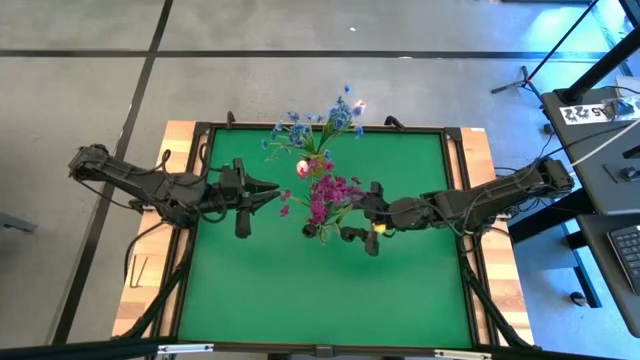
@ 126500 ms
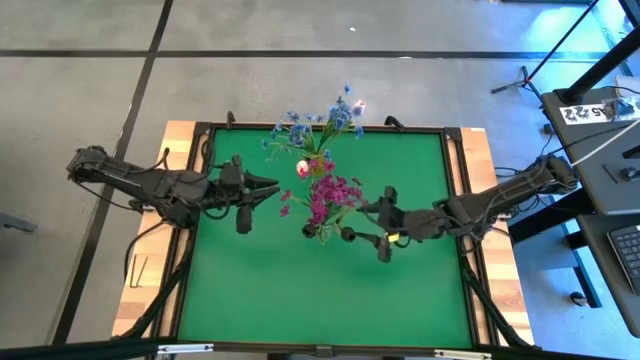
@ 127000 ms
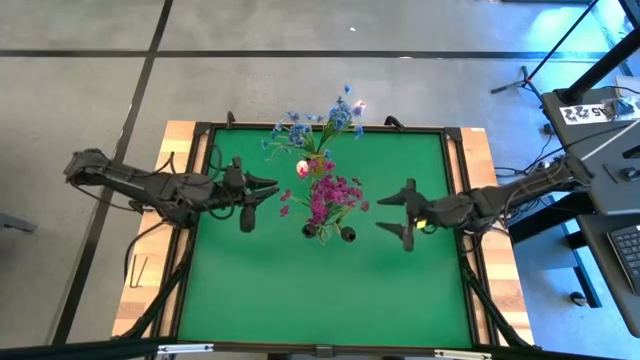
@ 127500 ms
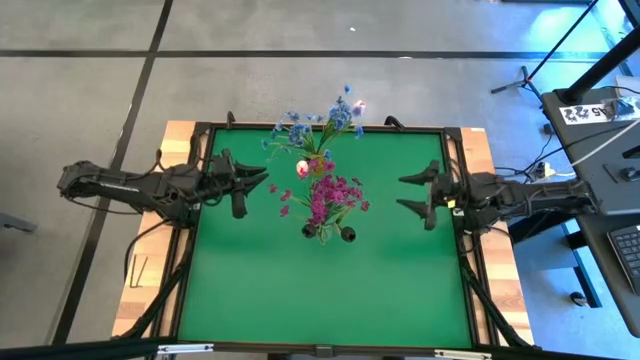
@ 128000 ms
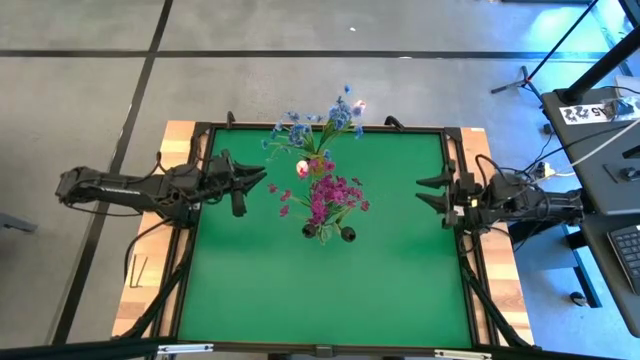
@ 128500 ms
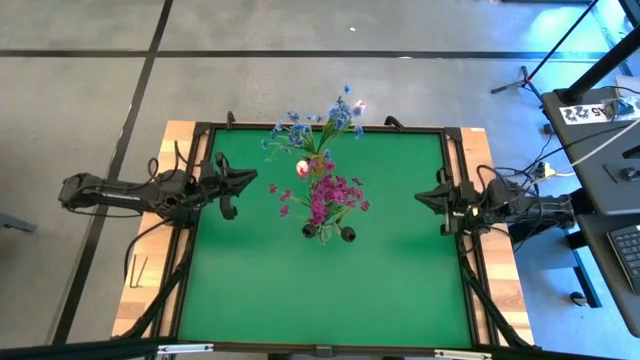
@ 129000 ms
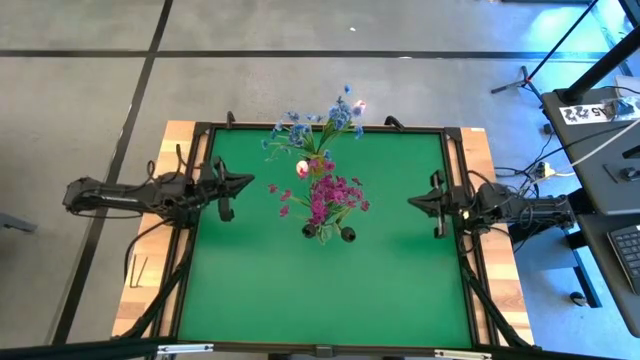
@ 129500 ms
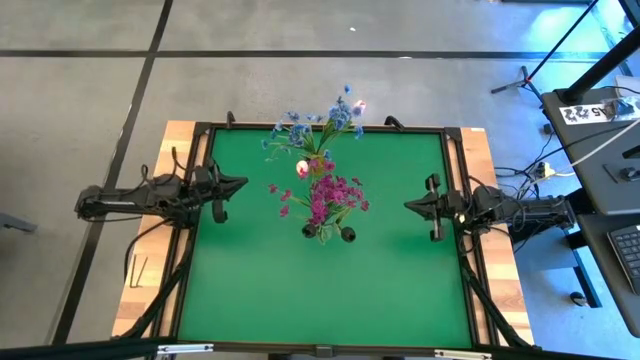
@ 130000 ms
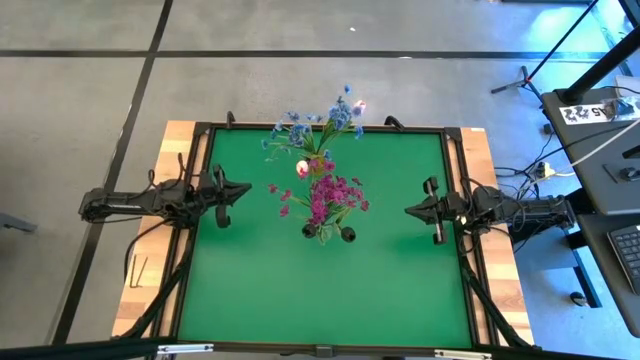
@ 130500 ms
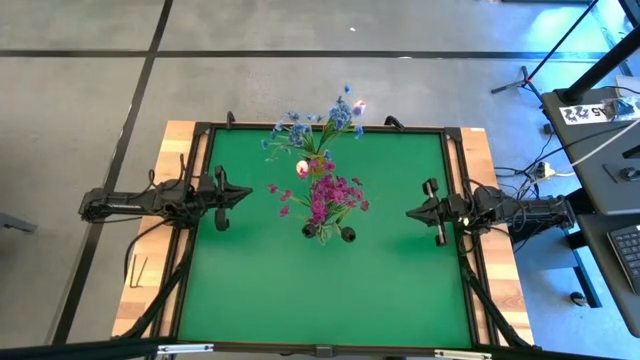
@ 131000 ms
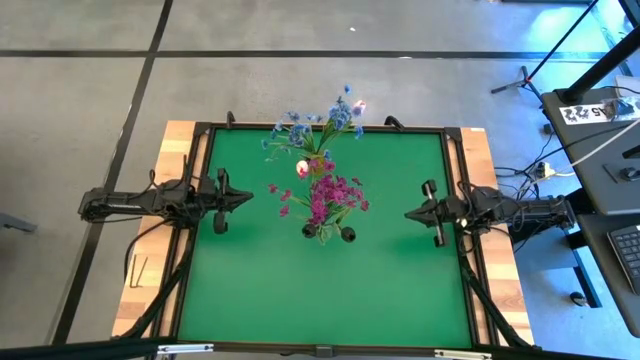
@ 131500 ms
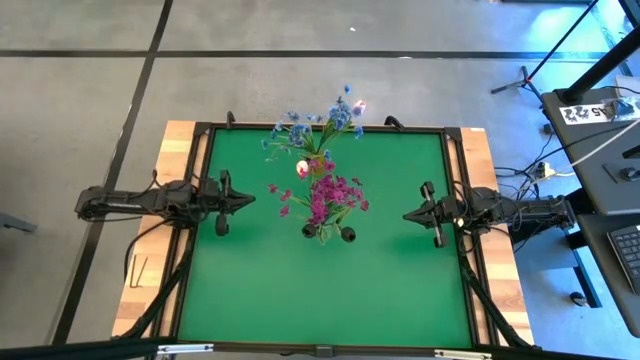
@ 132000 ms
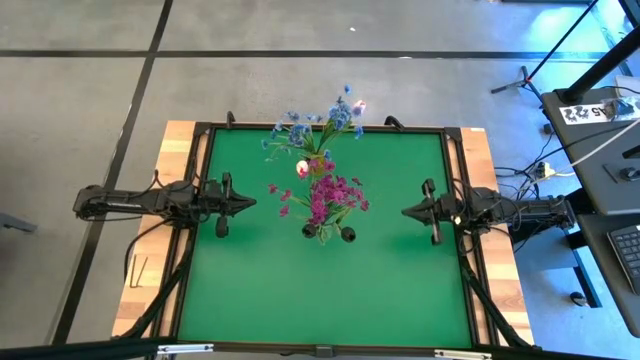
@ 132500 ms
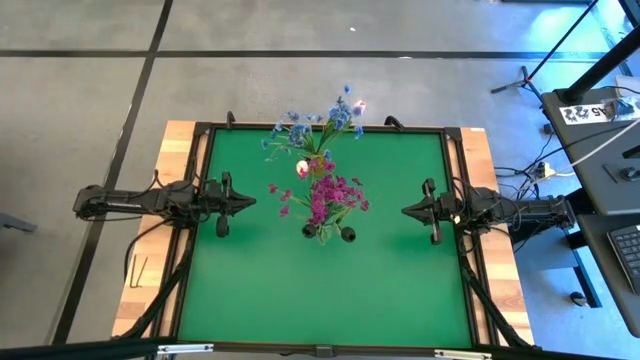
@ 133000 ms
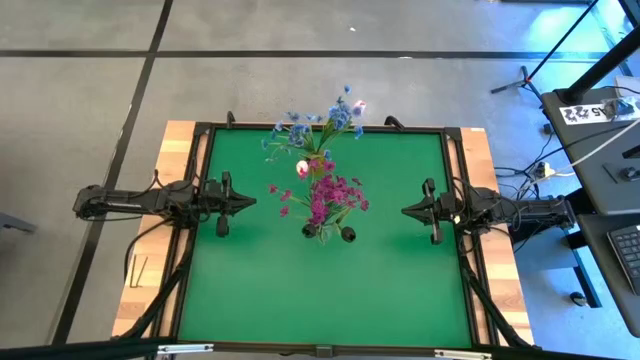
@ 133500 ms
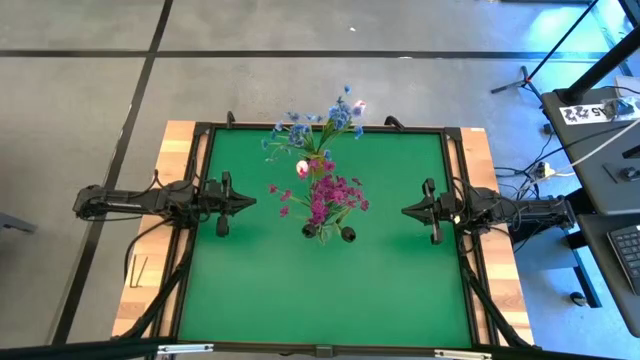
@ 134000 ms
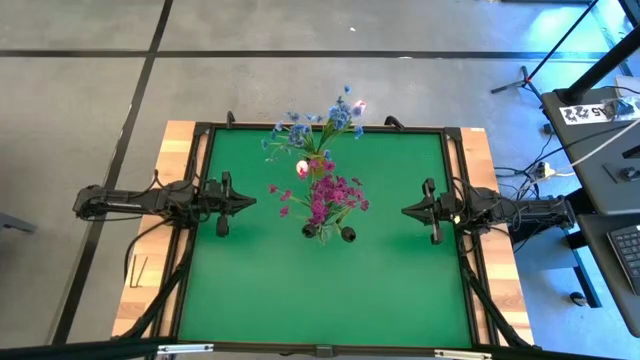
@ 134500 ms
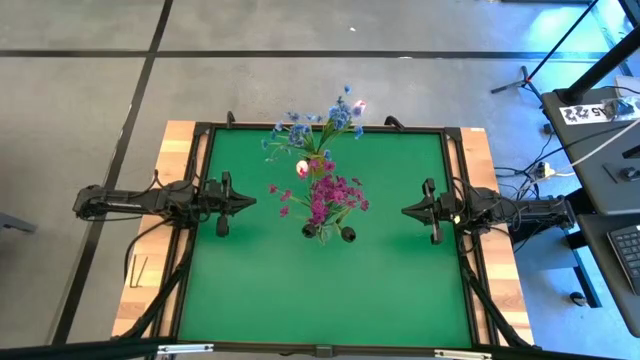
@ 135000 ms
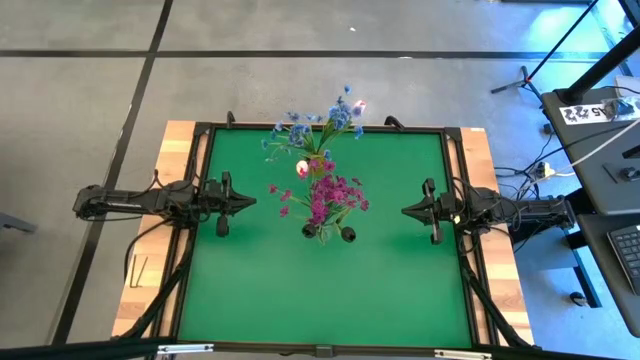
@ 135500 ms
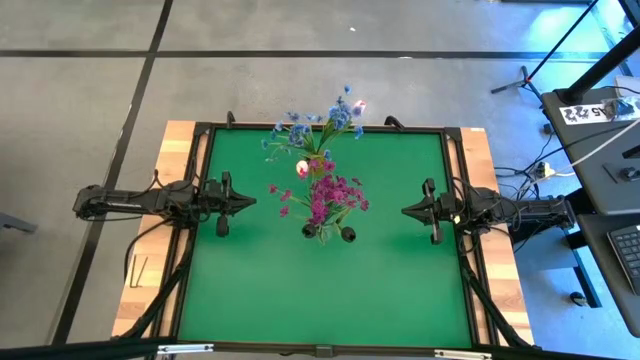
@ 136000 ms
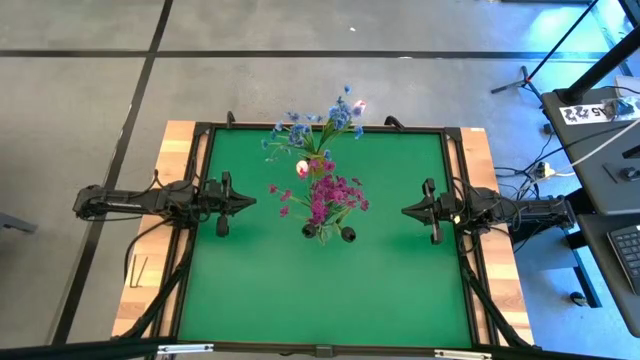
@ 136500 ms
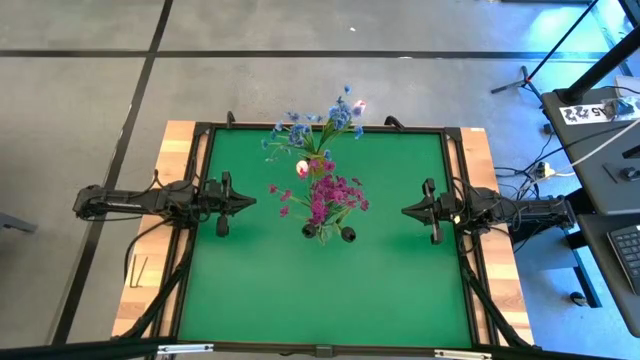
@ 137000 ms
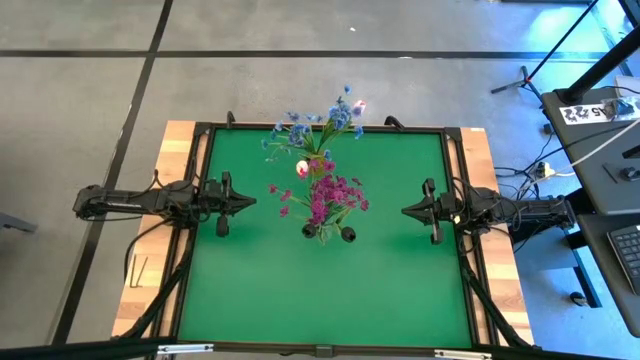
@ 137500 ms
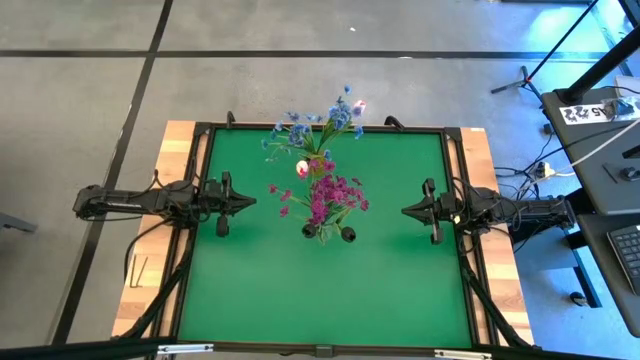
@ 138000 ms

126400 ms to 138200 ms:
Task: Sort flowers into vase by color
Return to Home Position

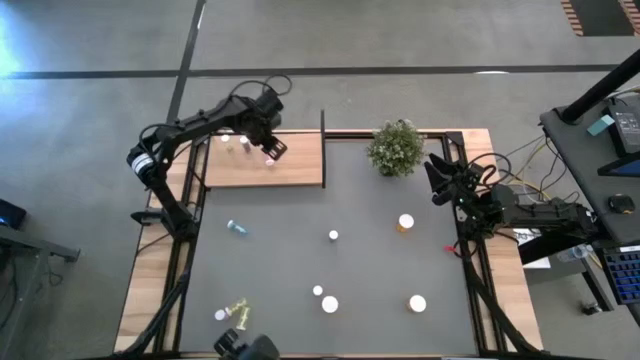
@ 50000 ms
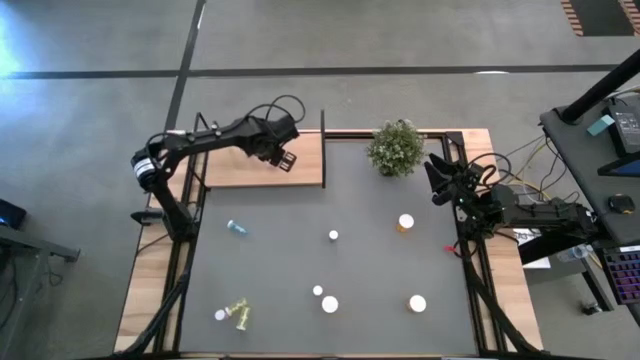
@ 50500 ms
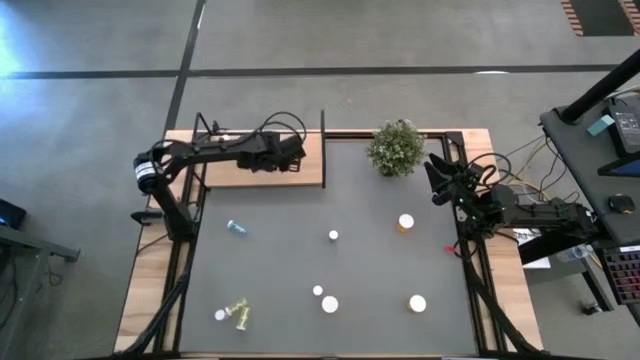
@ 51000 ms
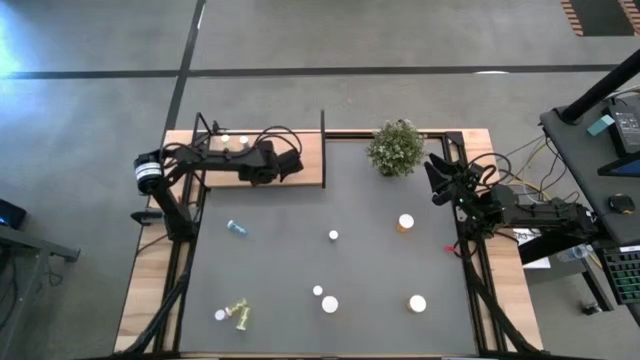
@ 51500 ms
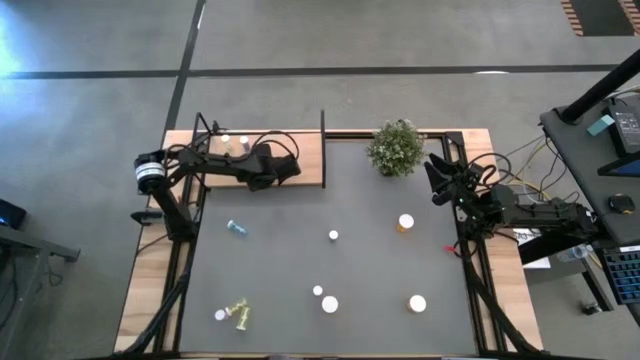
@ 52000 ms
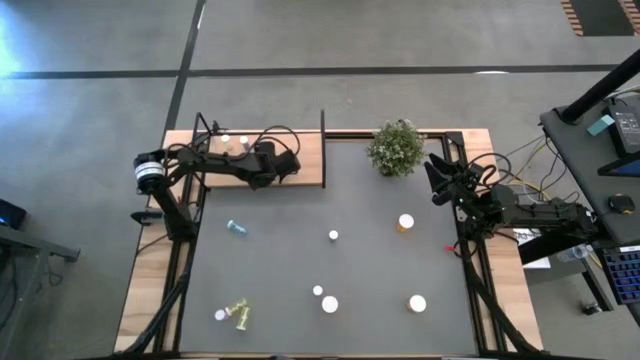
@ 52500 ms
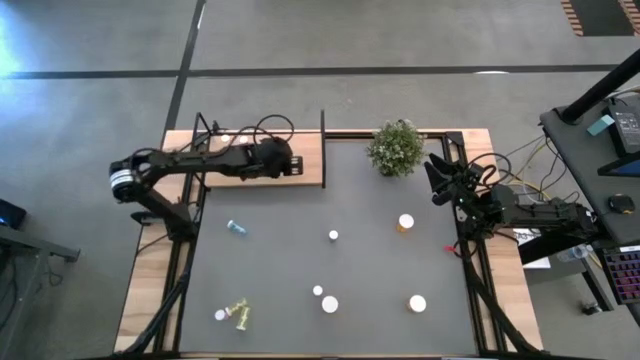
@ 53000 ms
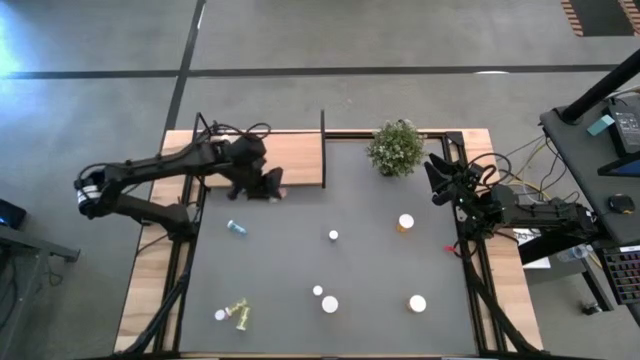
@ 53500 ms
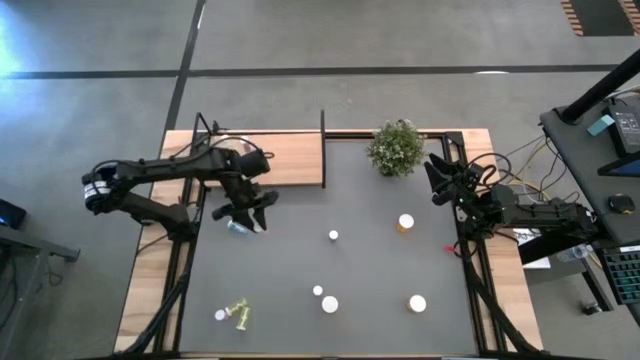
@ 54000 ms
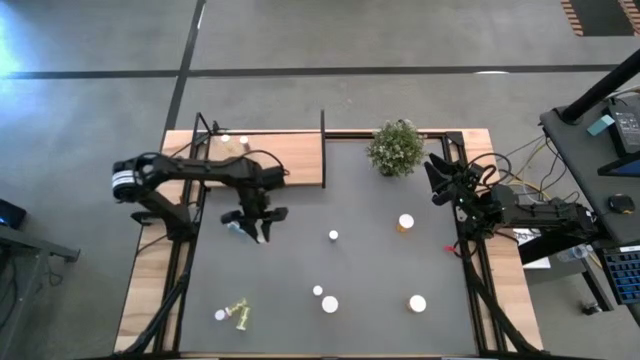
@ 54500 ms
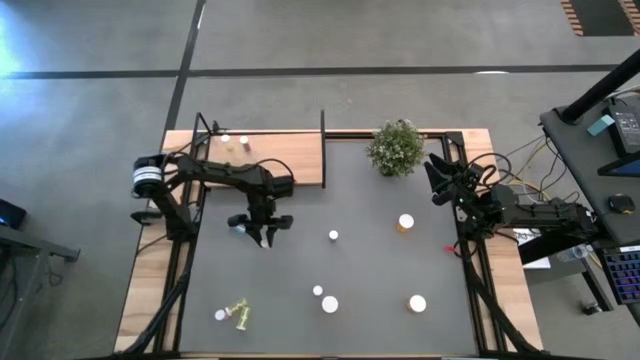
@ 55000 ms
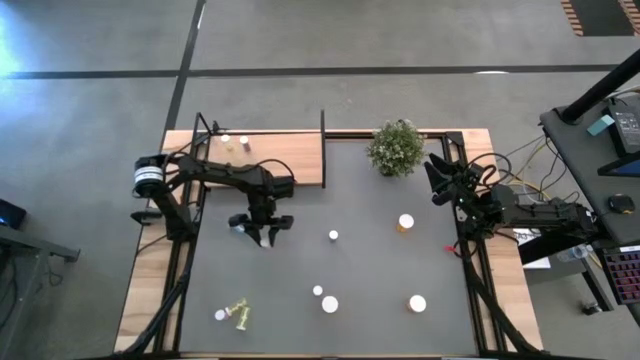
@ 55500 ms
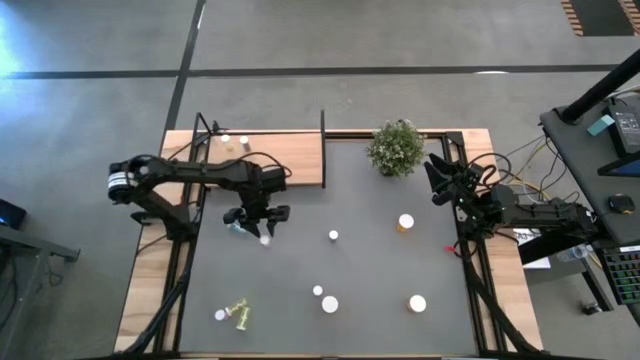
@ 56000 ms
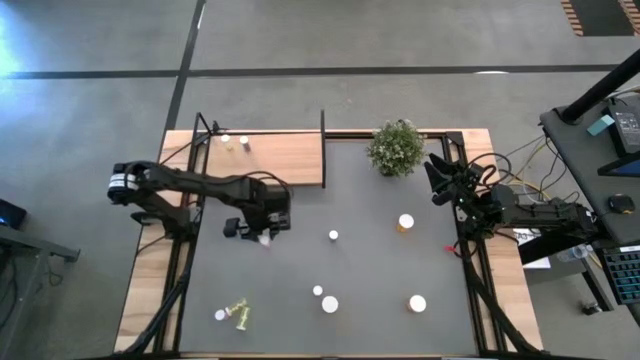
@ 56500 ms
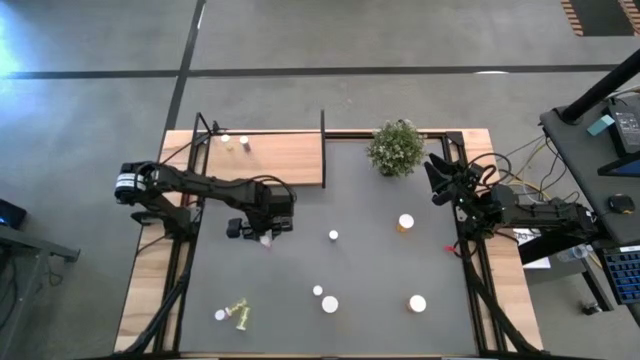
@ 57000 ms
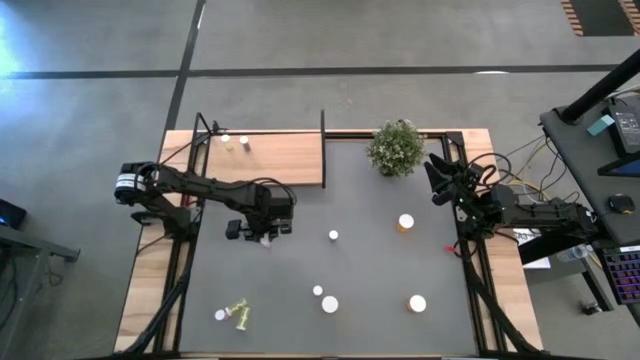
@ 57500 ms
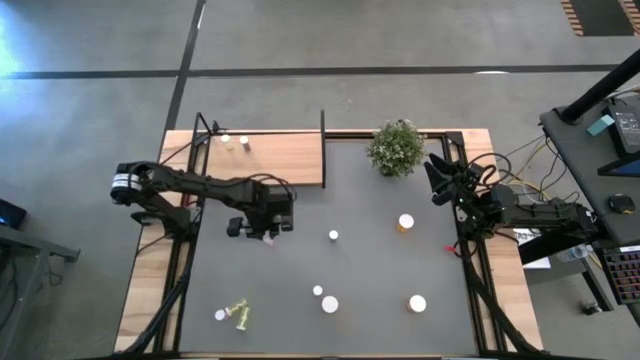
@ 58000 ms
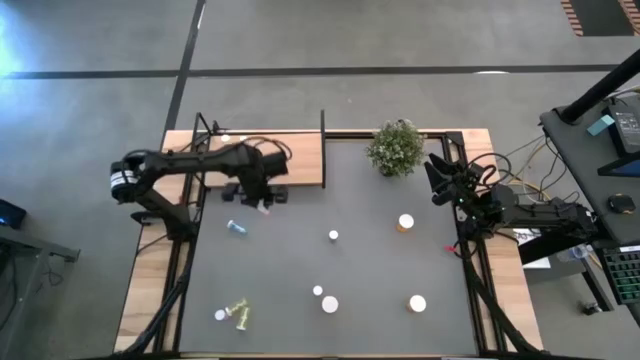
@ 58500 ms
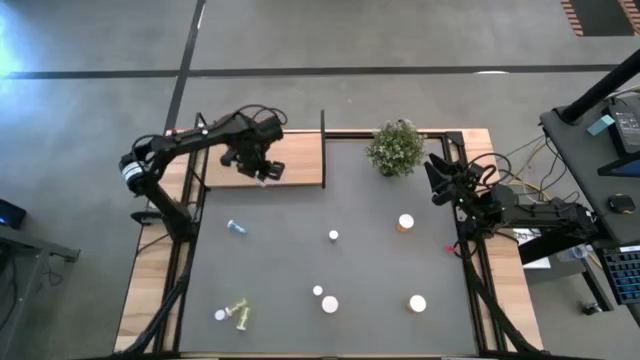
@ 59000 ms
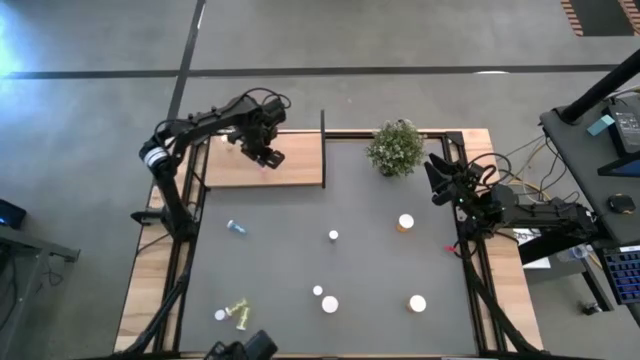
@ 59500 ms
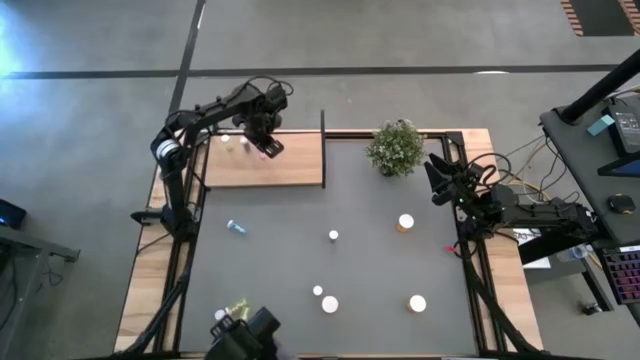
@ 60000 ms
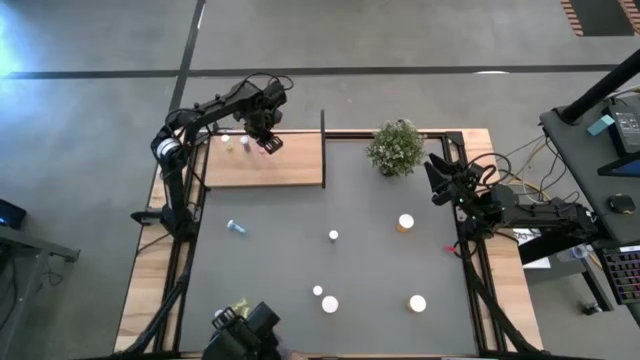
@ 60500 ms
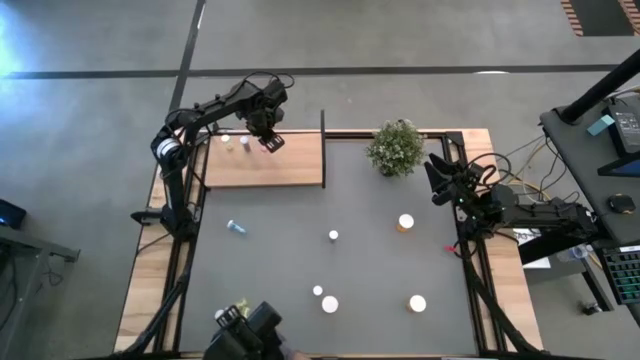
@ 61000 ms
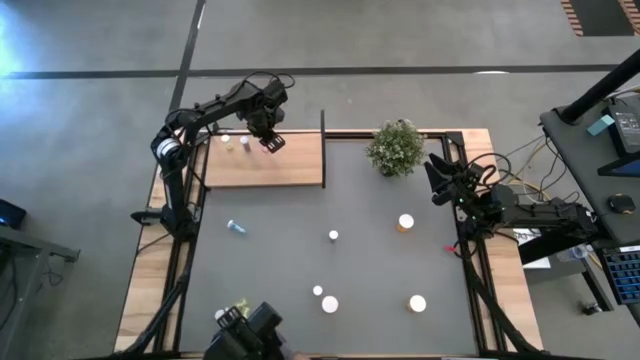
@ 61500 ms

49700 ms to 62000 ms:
Task: Pick and place medicine bottles onto shelf by color
Put the top pink pill bottle on the shelf
